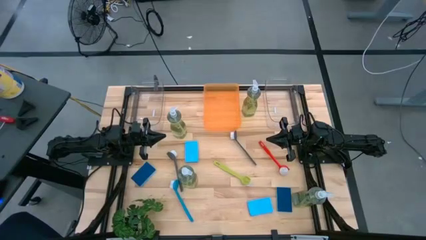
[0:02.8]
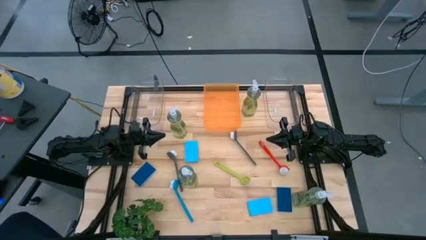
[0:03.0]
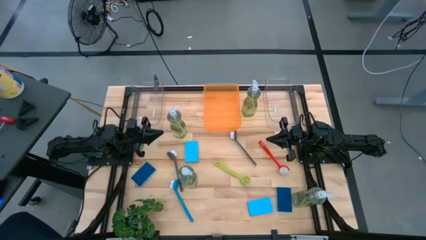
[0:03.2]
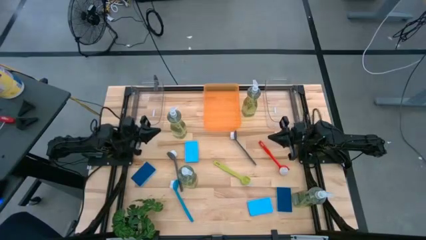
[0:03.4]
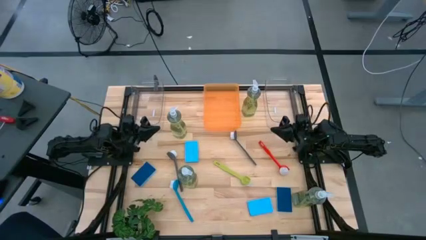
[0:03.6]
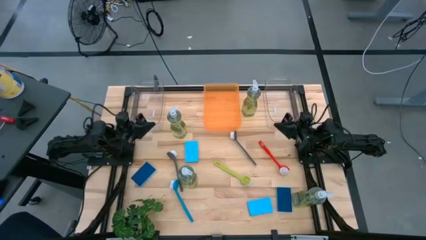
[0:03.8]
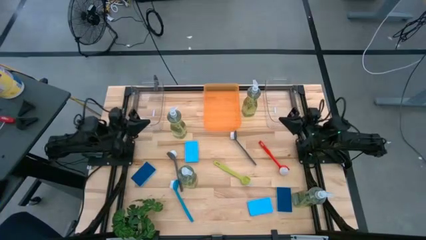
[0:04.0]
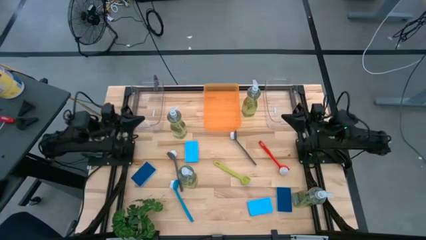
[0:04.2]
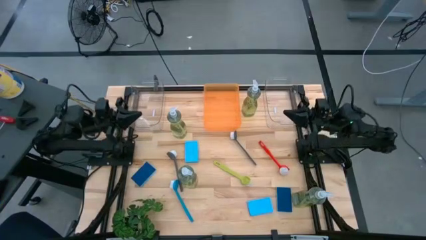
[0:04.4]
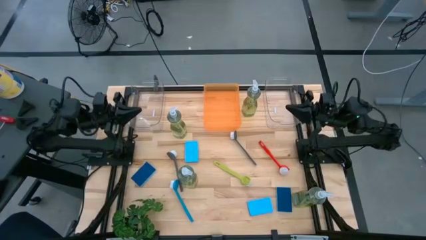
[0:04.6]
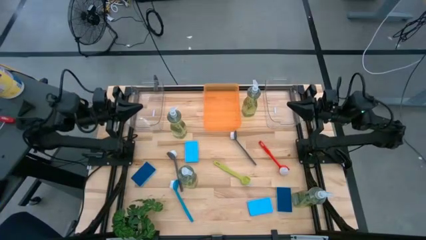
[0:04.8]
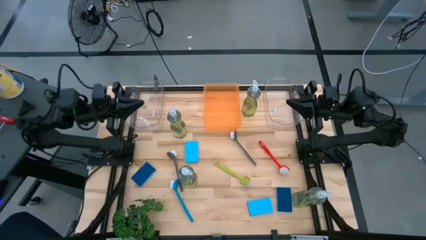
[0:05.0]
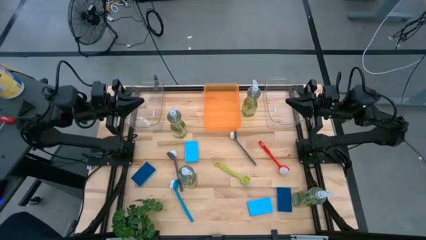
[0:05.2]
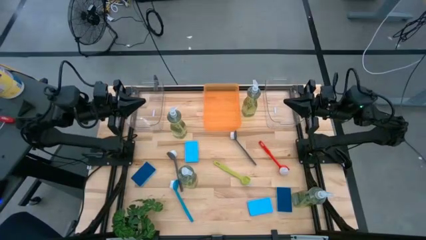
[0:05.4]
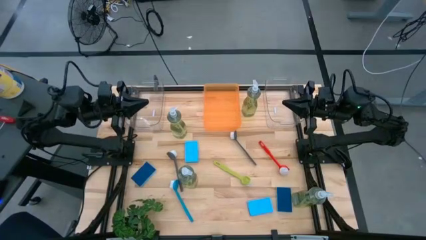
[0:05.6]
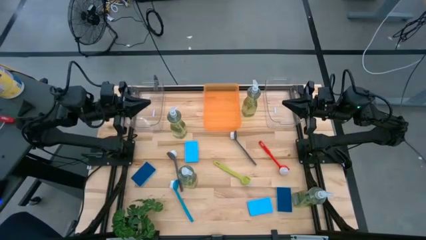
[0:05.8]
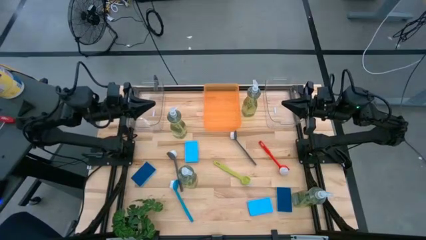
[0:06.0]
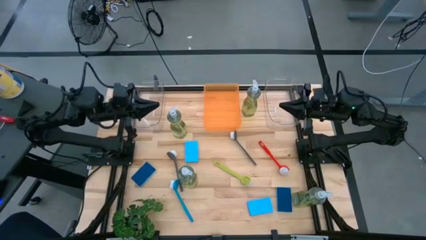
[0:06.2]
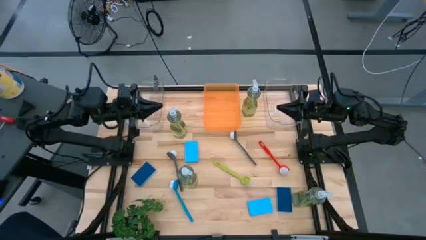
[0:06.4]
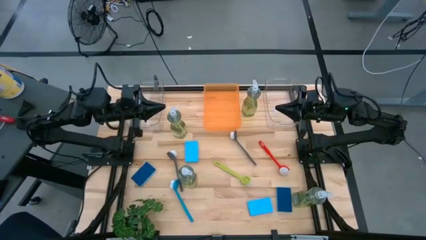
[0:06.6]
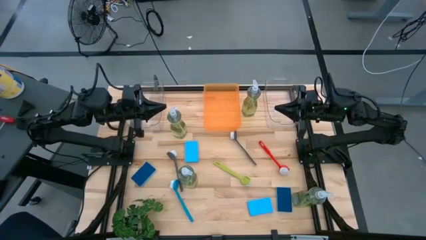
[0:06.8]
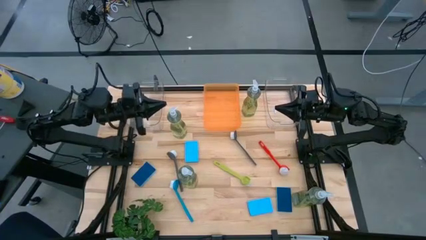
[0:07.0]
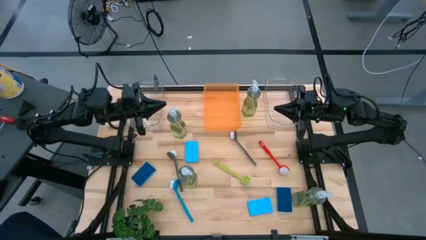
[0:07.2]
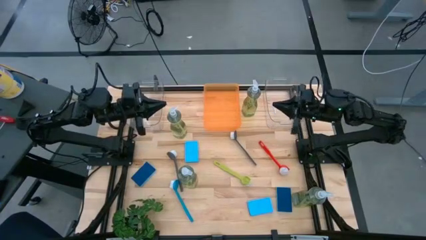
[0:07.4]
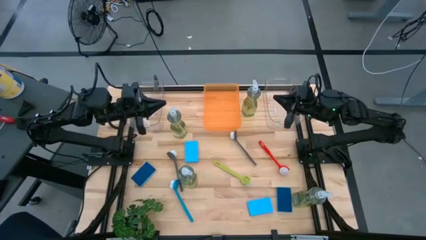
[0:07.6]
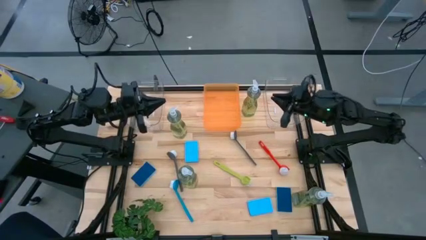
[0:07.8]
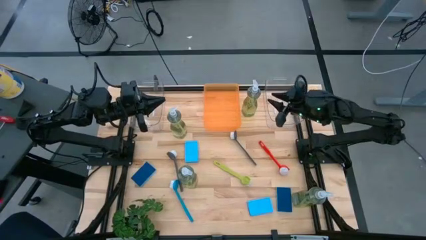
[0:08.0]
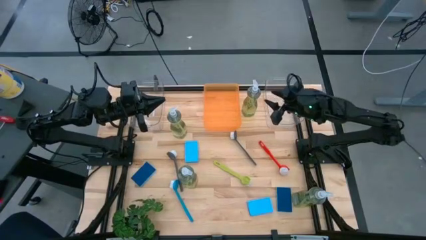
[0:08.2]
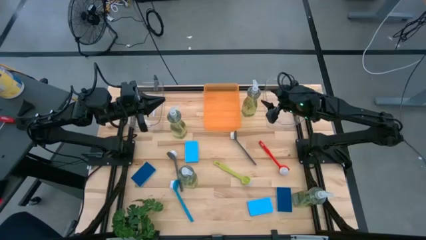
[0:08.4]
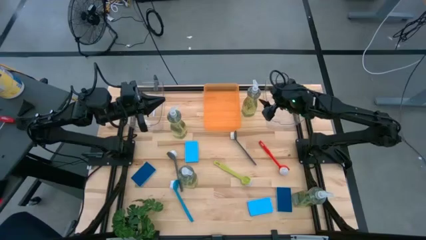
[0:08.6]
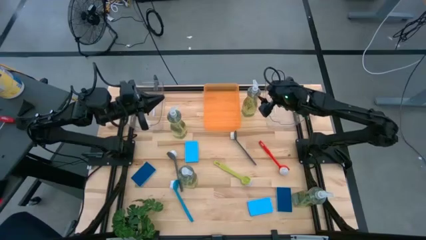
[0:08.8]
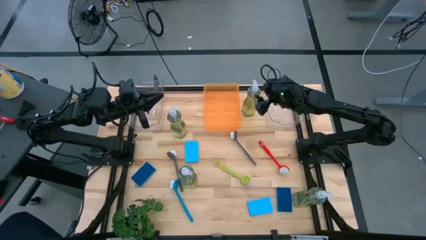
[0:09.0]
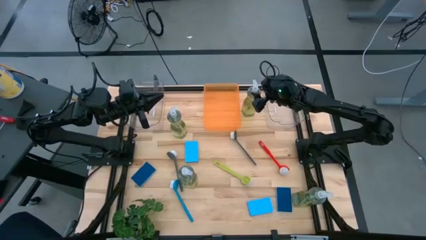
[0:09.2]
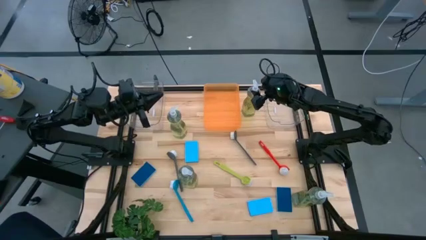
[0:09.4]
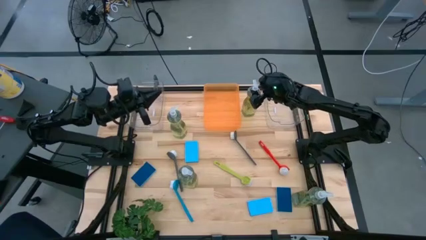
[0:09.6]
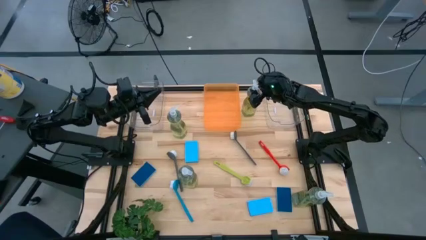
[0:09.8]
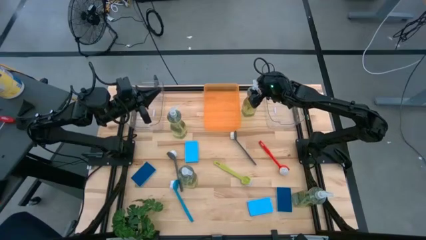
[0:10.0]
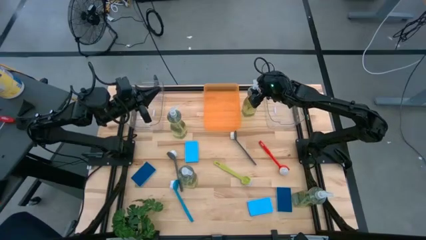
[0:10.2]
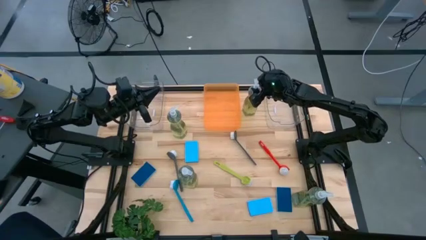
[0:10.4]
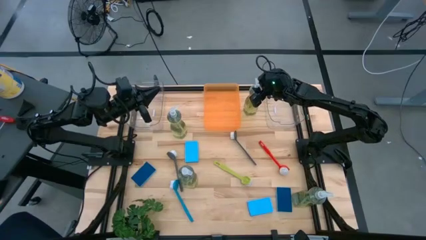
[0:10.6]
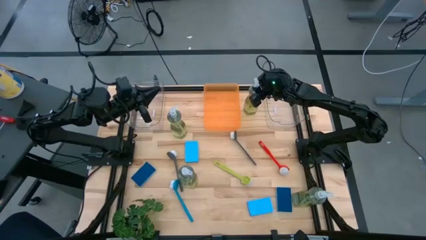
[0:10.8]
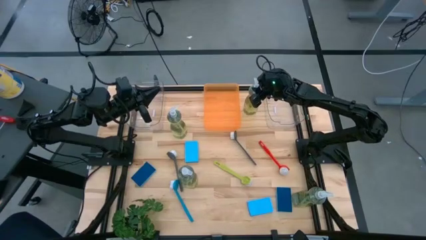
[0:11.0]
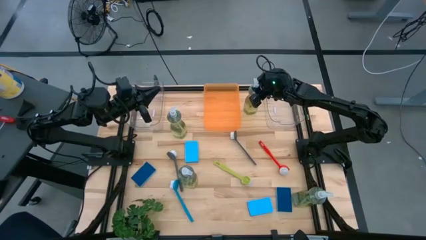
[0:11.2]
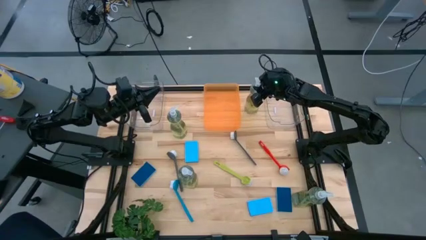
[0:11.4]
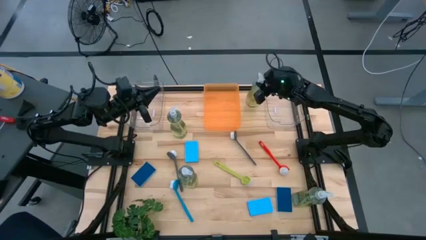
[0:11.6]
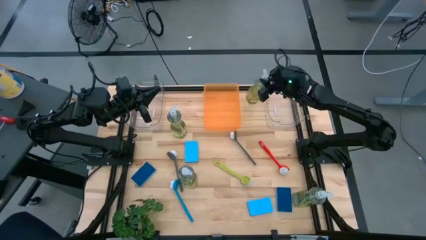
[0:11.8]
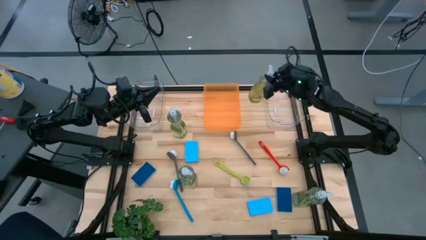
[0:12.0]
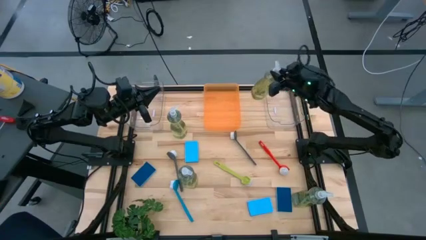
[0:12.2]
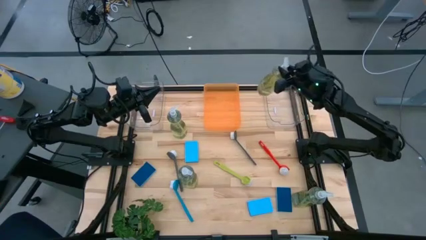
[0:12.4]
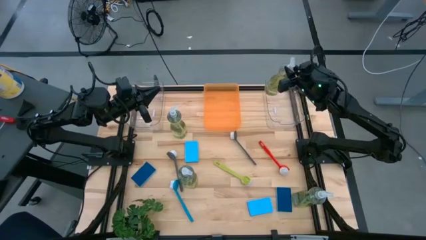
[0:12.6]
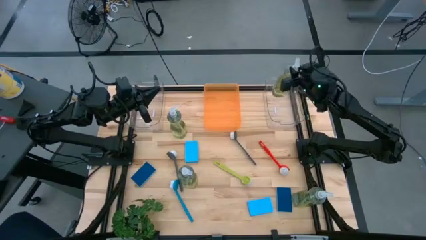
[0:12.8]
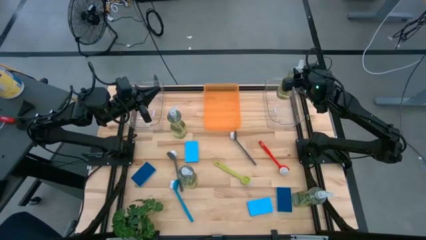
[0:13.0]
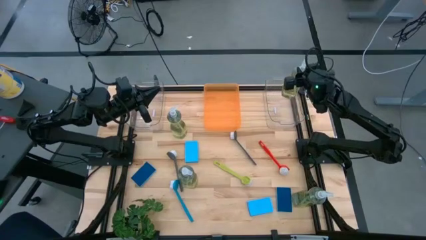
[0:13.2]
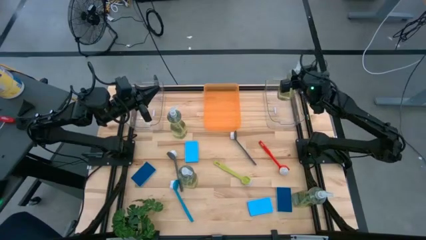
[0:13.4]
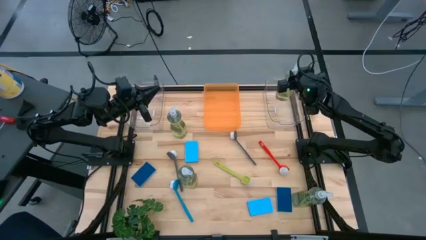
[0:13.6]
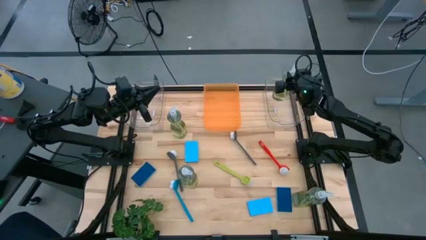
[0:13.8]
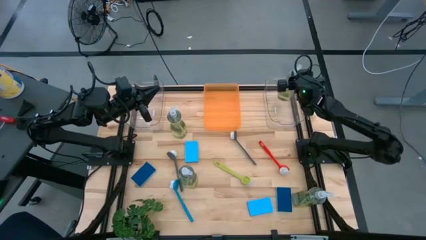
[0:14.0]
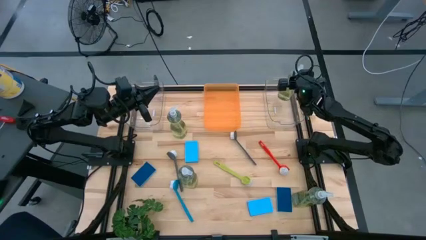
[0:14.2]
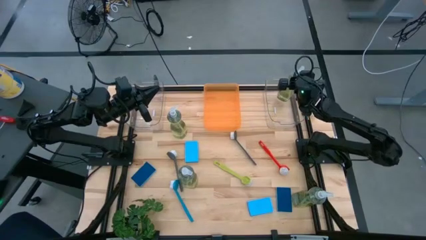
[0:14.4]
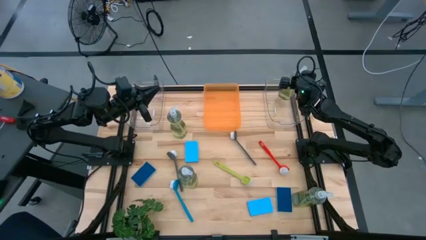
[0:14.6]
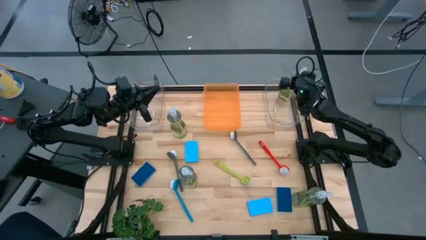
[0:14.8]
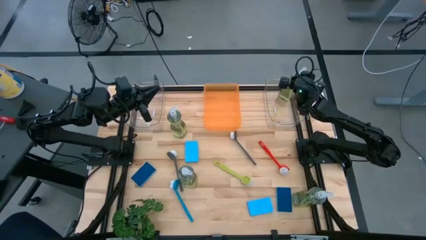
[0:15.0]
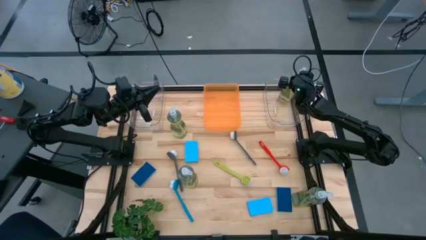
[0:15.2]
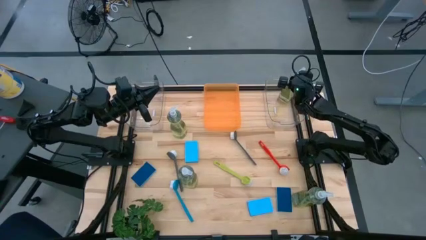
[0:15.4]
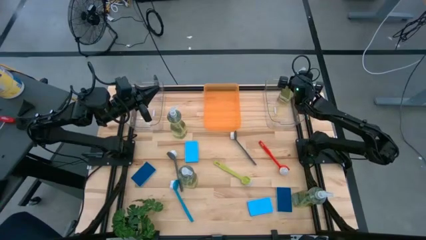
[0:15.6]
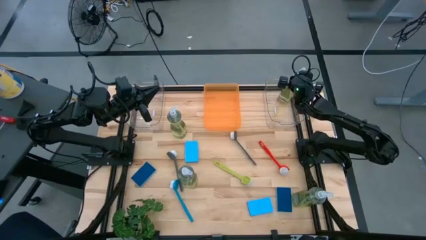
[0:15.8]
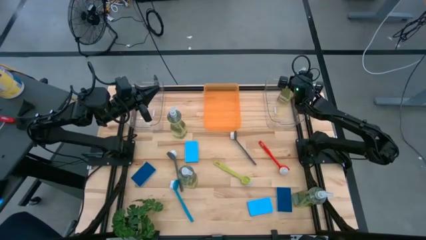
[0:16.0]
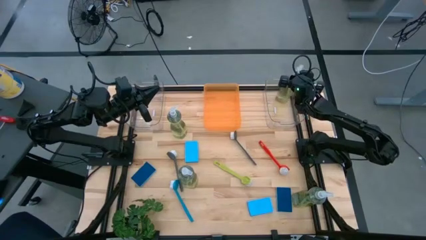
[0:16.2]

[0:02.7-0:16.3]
Task: Pick & Place Kitchen Sink Supplies
Put the yellow dish soap into the right transparent bin

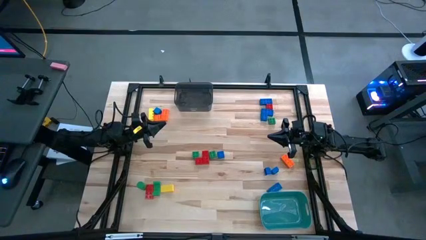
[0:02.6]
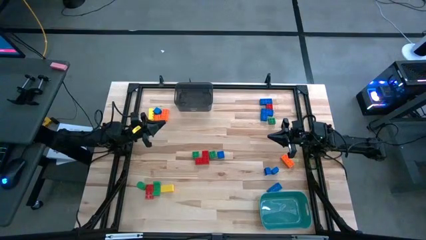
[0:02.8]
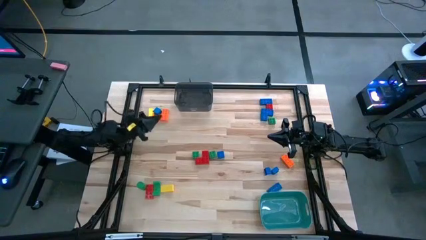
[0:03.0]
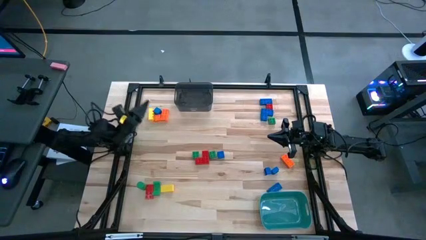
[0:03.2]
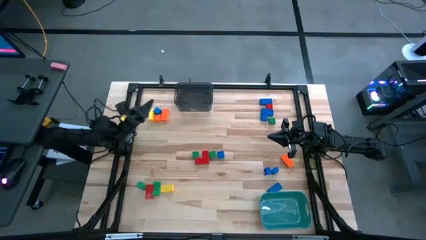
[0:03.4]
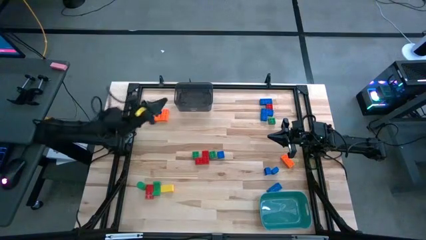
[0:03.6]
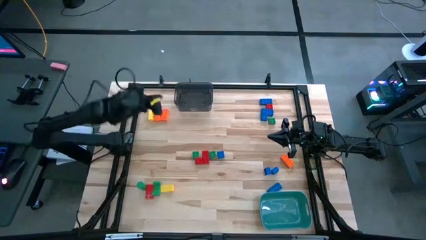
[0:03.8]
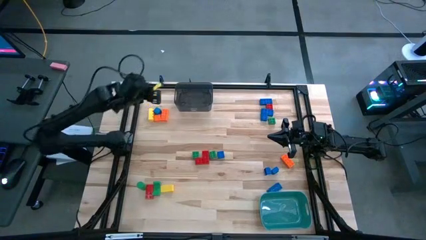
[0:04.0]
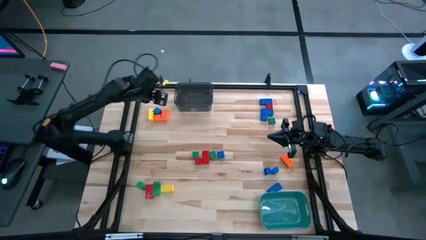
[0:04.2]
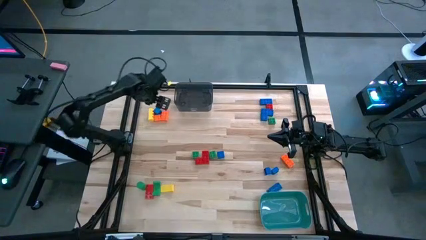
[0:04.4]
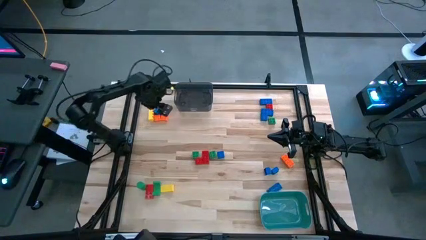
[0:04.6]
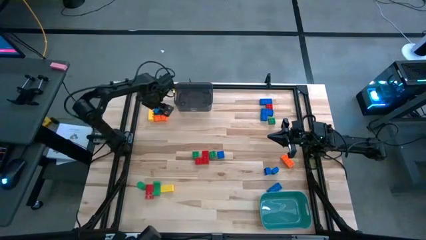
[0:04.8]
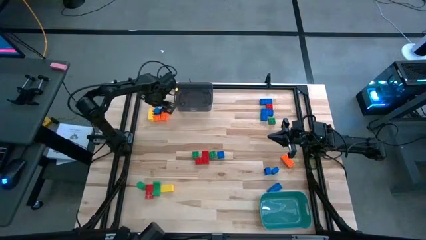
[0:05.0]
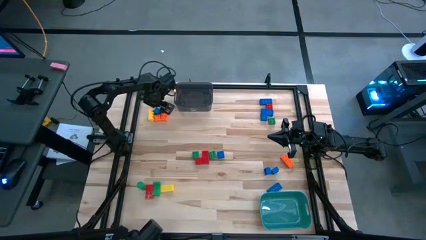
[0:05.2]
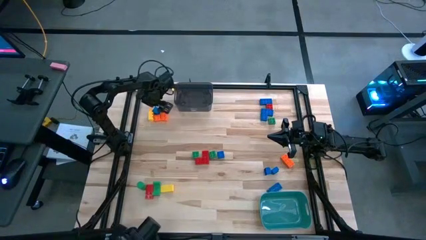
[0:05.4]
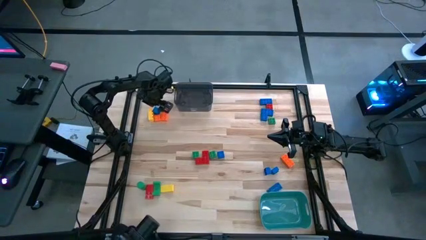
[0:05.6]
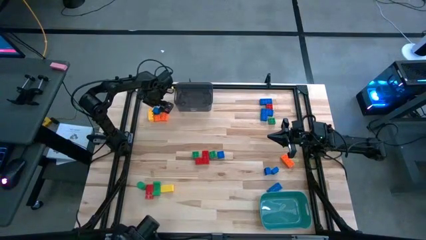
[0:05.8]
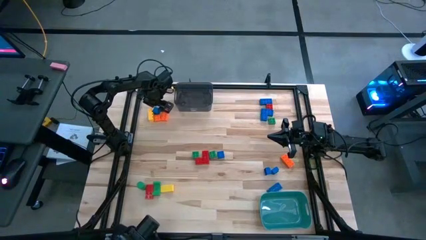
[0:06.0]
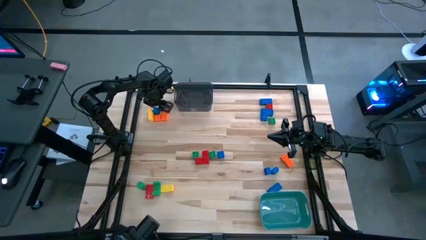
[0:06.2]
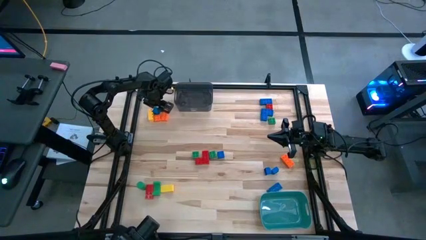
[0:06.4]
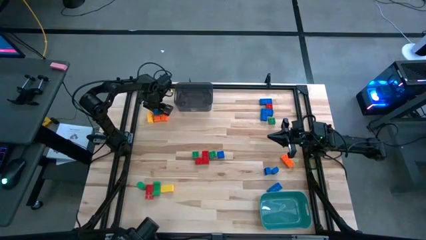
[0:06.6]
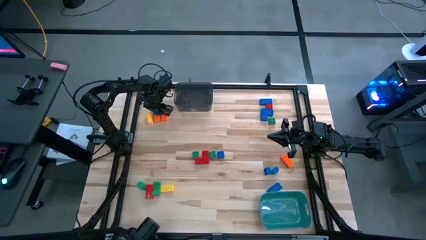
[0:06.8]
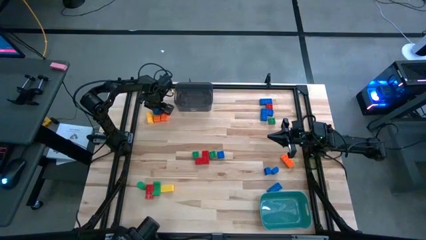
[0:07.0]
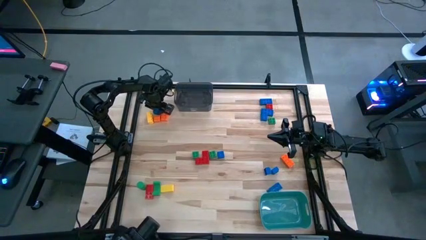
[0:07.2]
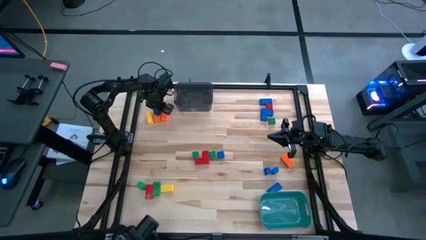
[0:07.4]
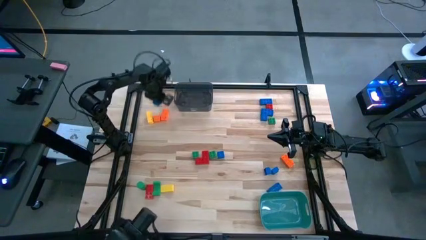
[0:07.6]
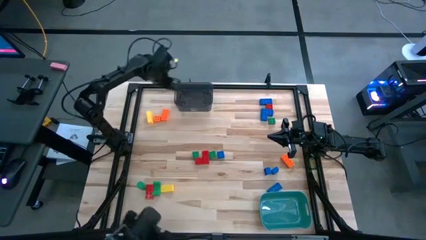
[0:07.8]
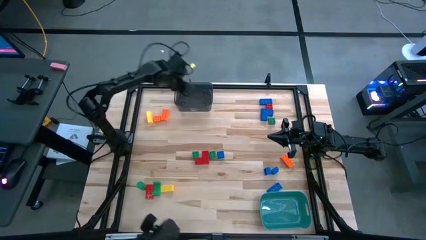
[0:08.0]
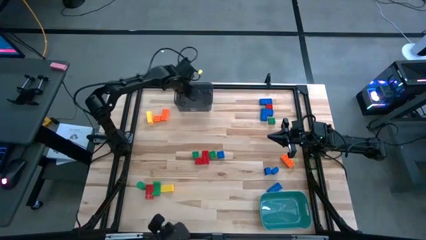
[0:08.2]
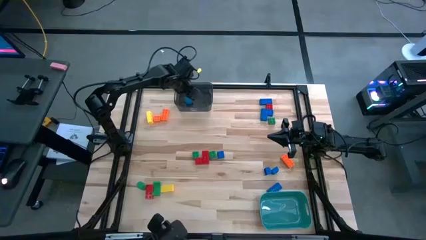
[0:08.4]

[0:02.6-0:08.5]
Task: Sort blocks by size
Put the blue game piece into the black bin
